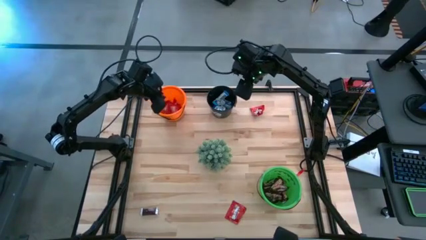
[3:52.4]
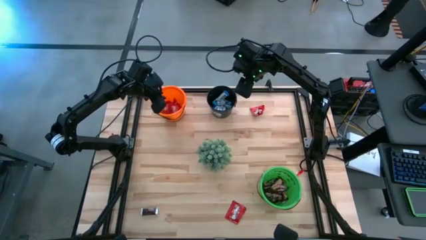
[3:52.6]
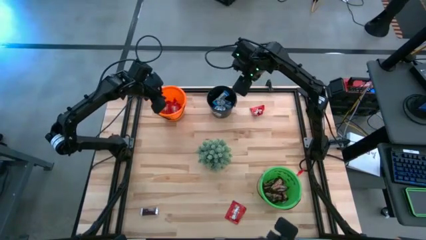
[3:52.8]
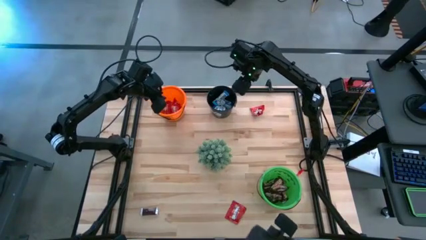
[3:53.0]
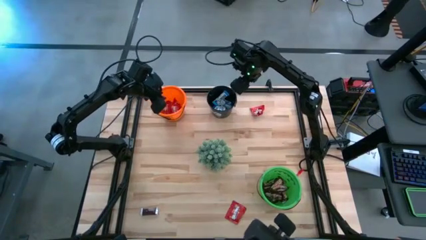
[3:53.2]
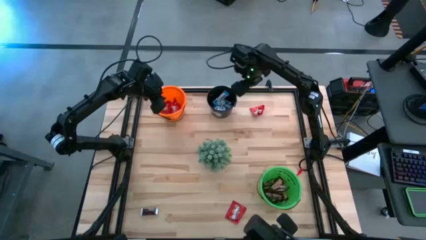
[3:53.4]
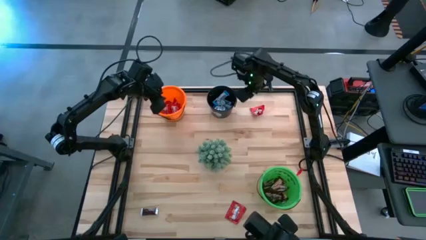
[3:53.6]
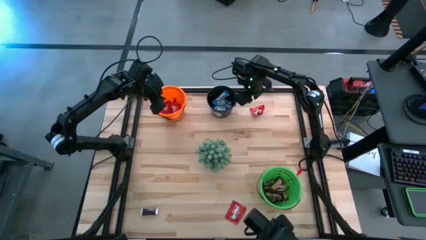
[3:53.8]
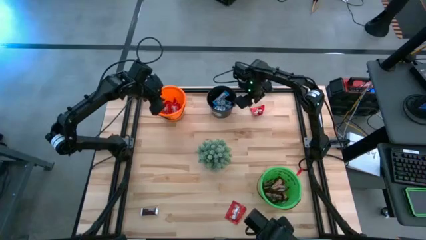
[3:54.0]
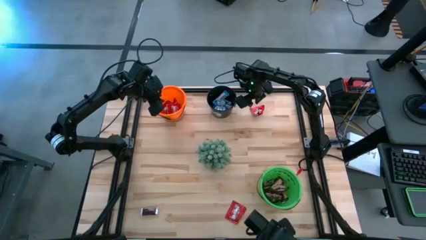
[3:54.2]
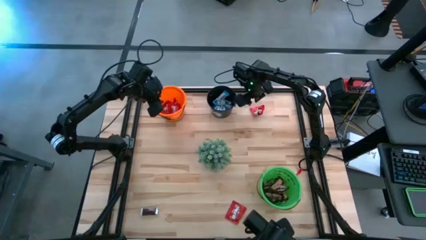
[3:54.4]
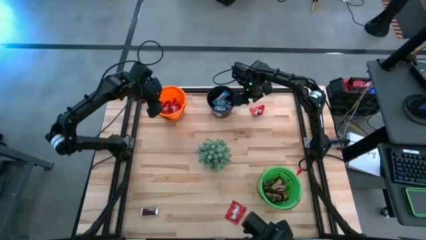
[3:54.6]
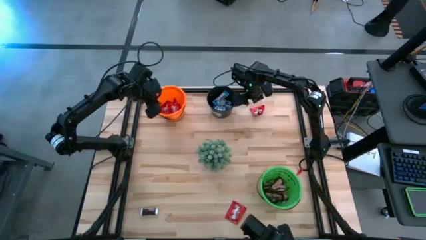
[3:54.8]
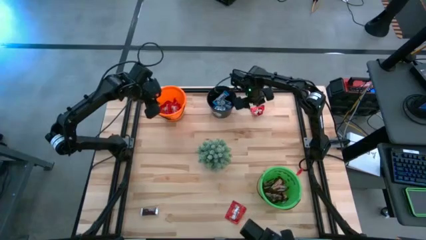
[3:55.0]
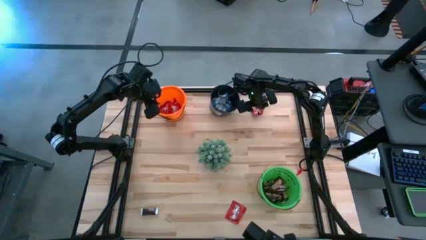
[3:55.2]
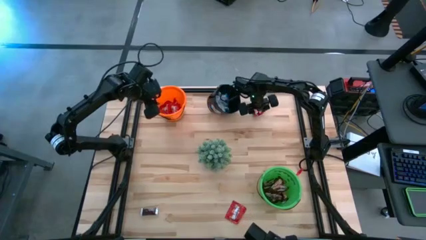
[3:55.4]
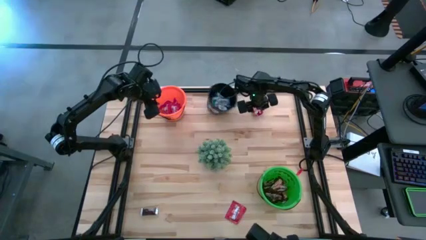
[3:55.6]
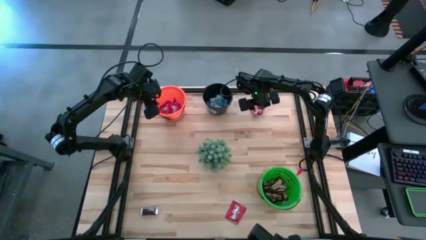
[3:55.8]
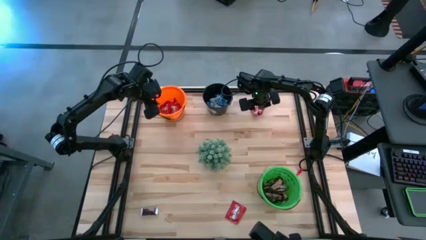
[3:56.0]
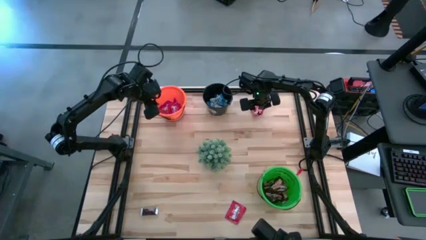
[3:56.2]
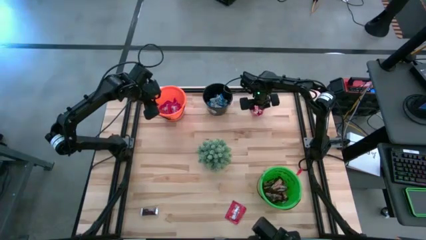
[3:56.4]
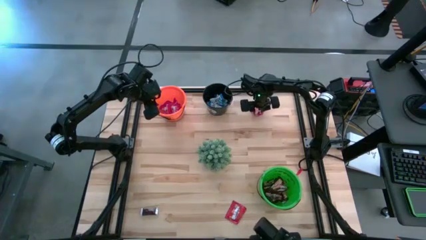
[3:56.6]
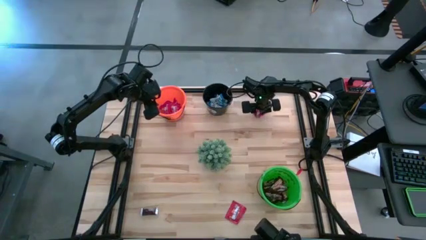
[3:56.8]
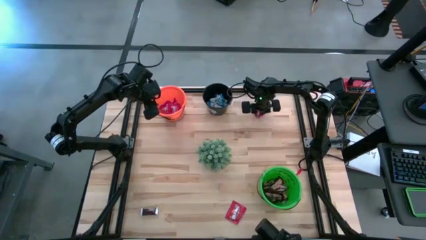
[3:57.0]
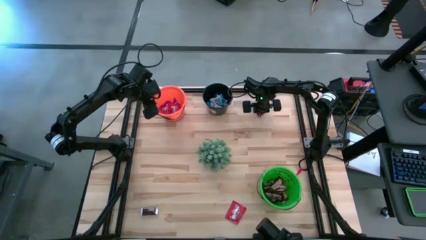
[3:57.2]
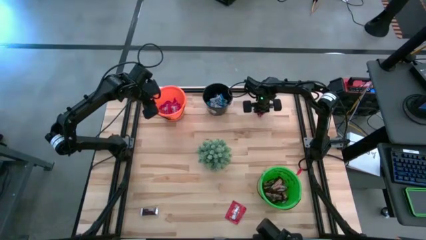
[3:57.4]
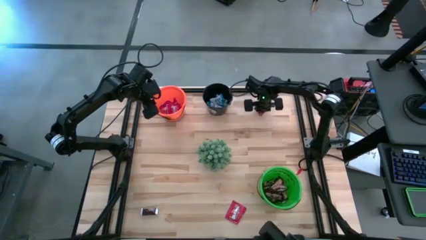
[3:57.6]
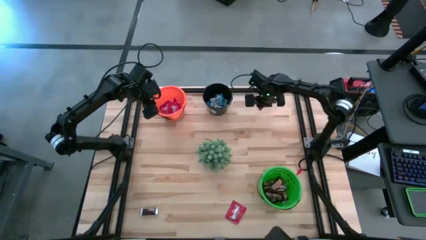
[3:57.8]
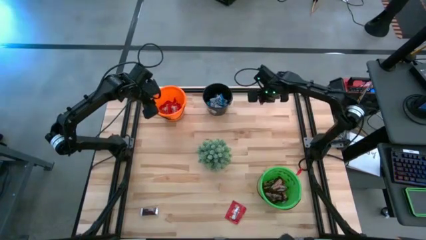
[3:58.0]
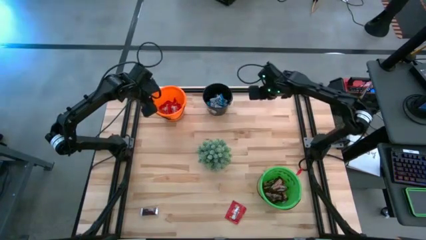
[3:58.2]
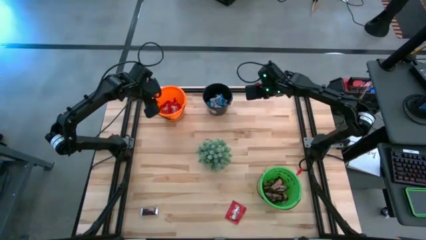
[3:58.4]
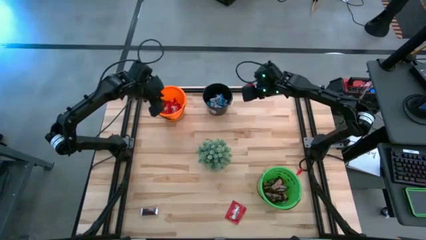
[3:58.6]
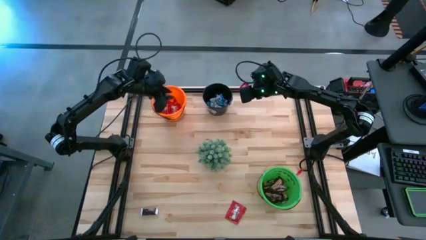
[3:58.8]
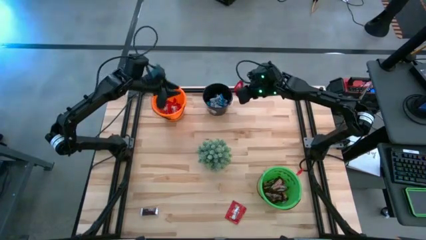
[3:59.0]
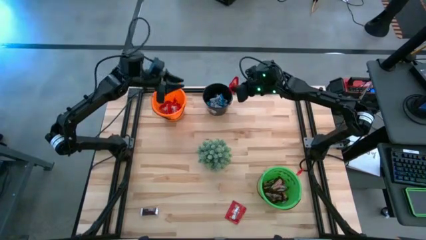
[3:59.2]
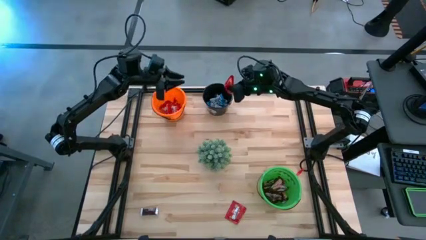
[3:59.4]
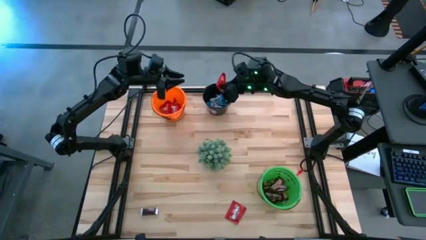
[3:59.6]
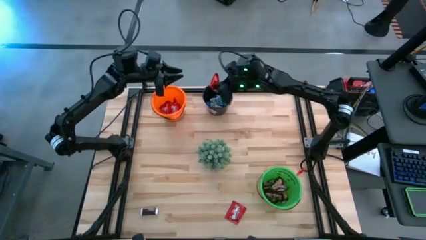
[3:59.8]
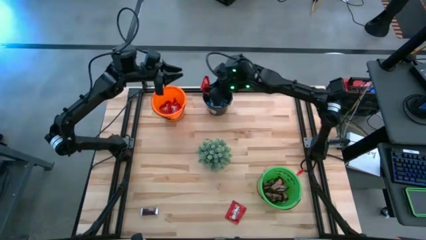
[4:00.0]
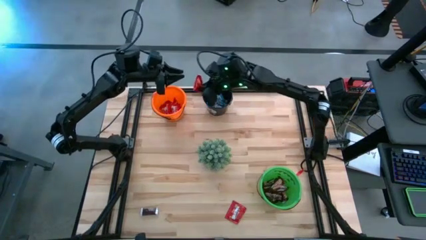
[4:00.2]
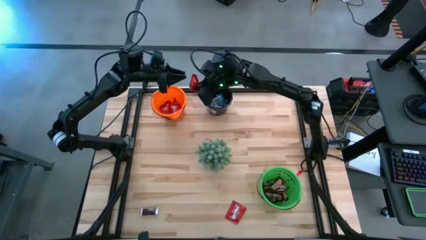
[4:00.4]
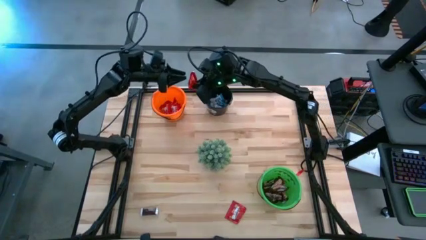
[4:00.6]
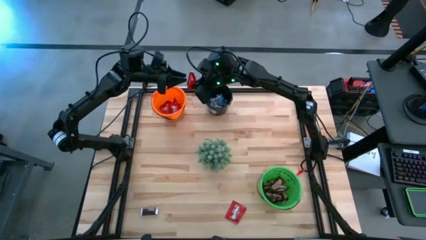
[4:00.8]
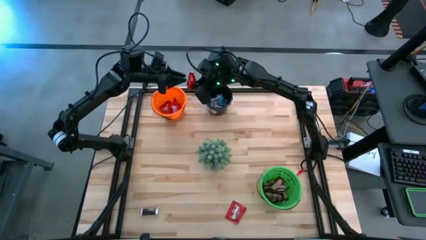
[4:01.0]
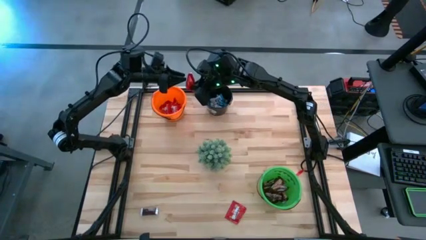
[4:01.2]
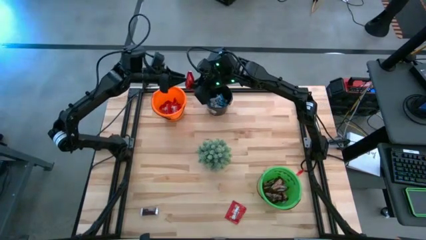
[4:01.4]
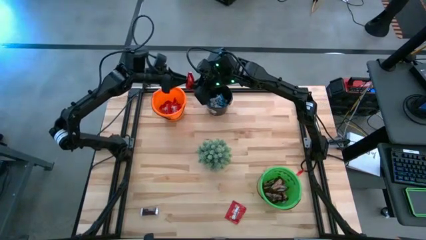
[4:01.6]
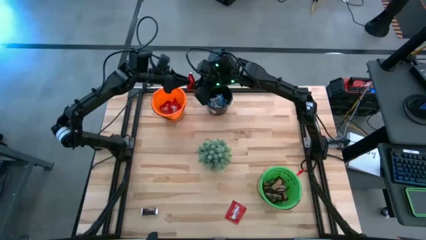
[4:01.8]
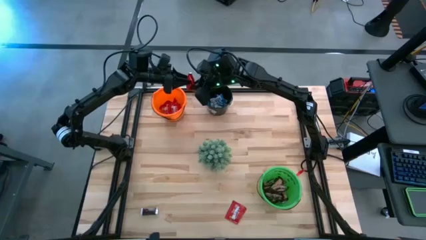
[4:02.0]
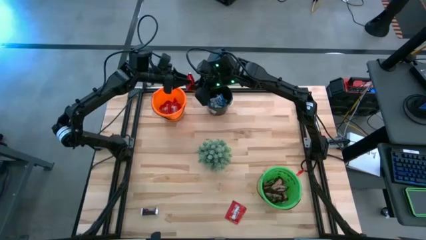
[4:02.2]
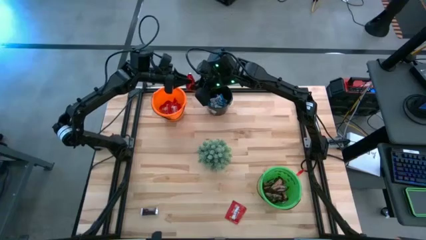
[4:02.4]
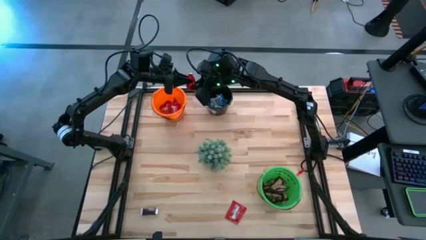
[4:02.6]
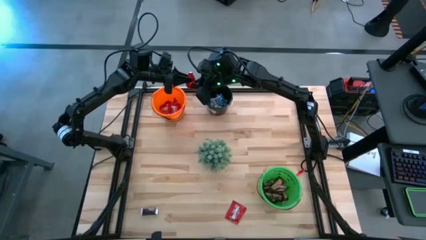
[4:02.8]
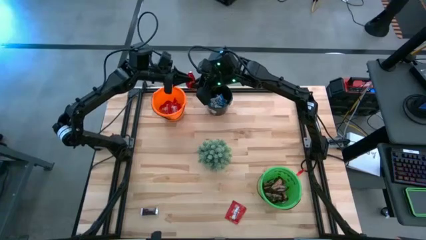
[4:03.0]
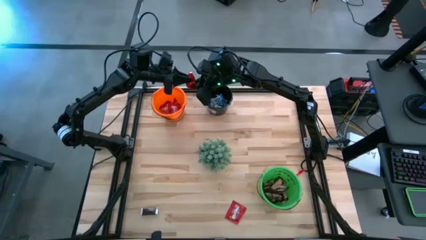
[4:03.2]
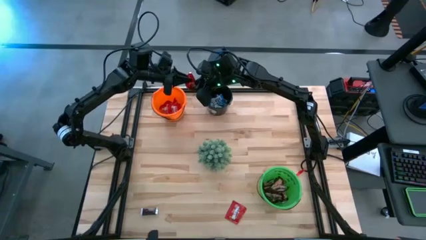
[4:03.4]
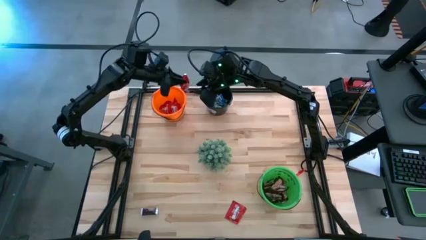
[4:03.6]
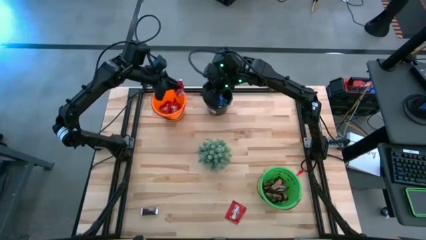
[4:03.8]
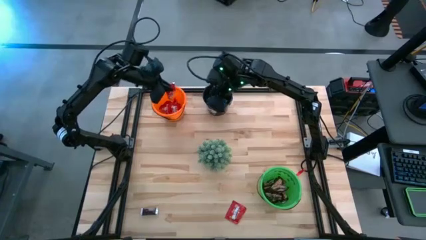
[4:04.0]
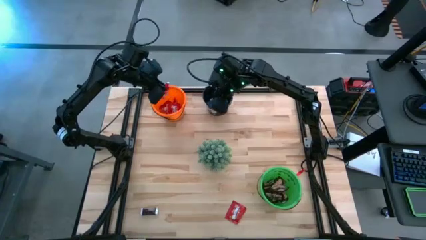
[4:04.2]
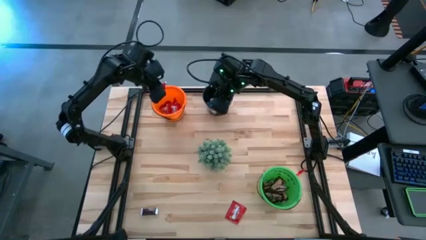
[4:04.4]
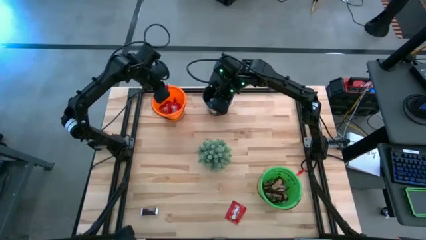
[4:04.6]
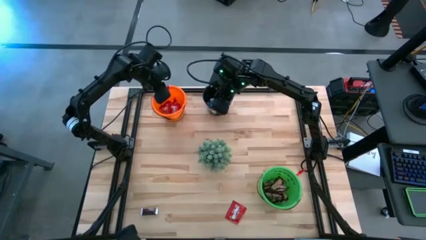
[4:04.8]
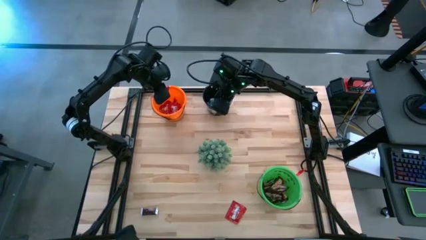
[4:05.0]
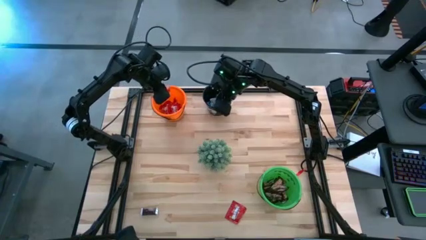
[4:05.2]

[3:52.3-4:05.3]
Task: Organize candy in baskets
Put the red candy into the orange bucket
